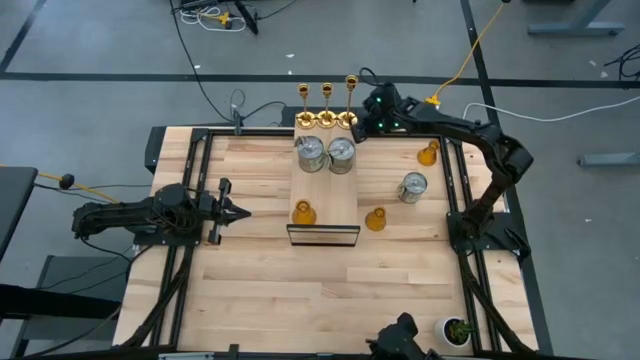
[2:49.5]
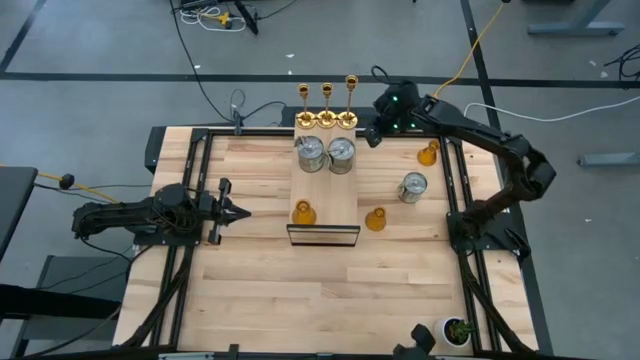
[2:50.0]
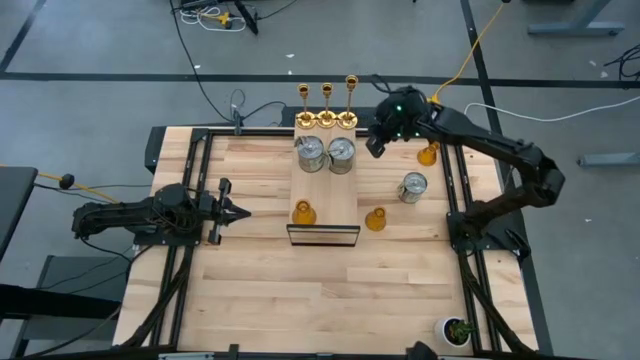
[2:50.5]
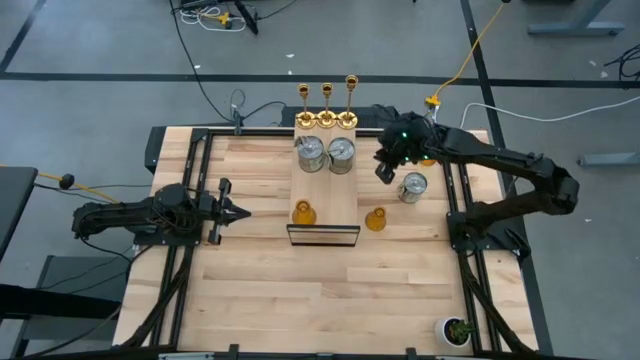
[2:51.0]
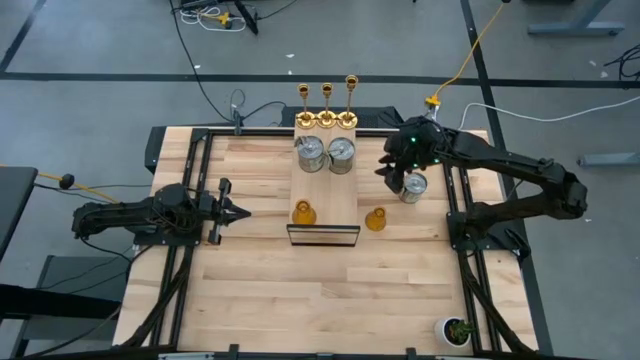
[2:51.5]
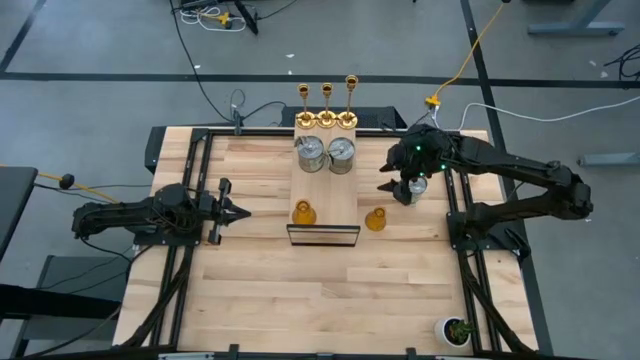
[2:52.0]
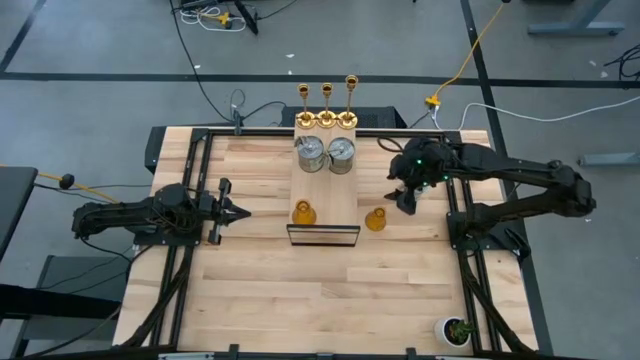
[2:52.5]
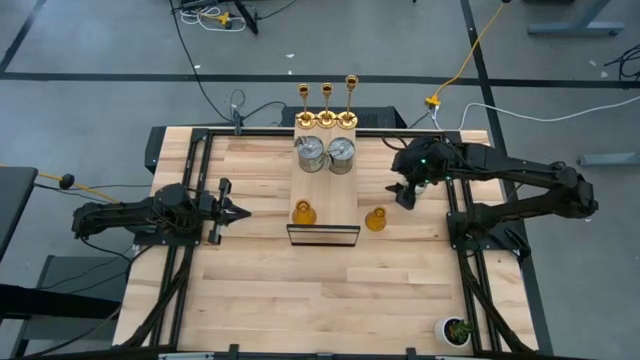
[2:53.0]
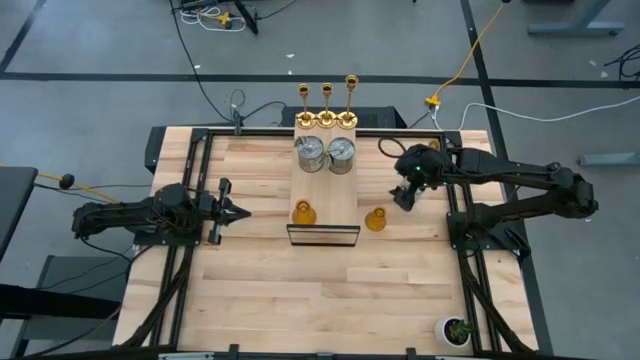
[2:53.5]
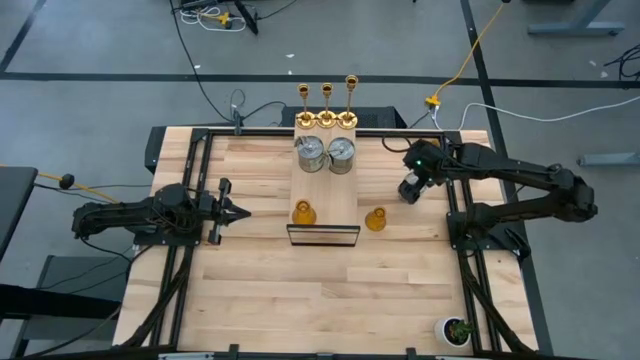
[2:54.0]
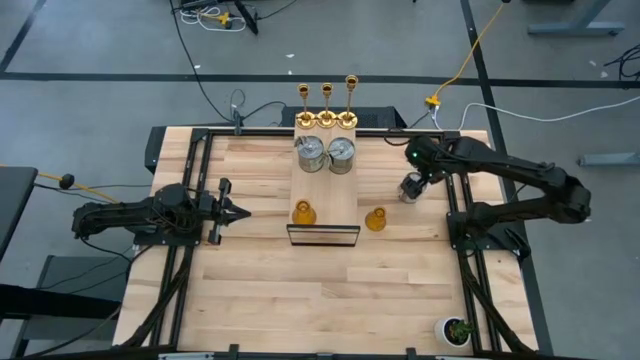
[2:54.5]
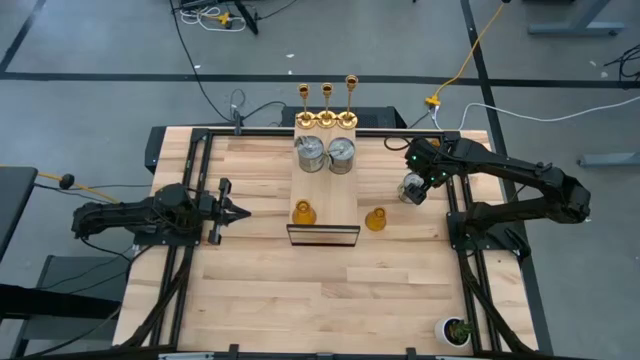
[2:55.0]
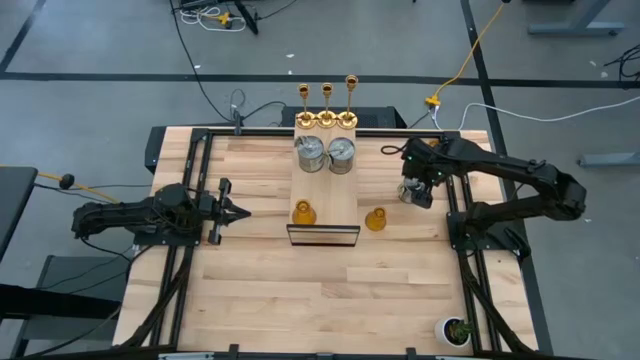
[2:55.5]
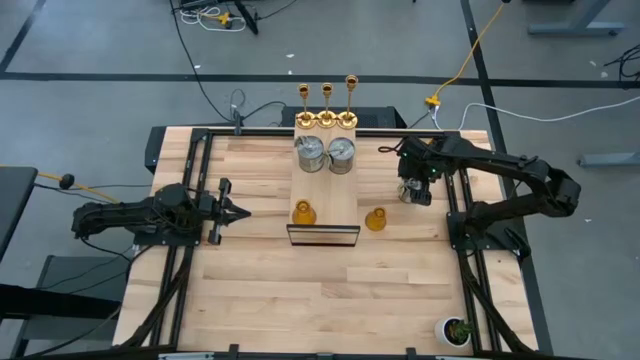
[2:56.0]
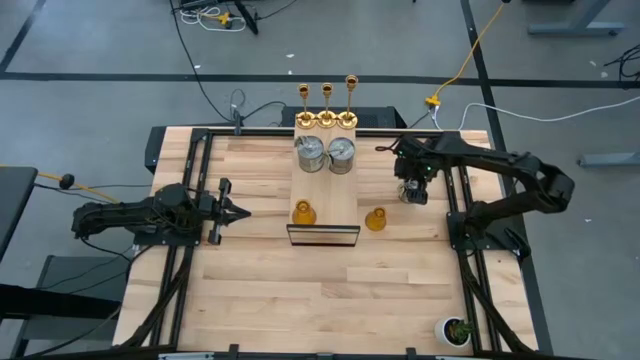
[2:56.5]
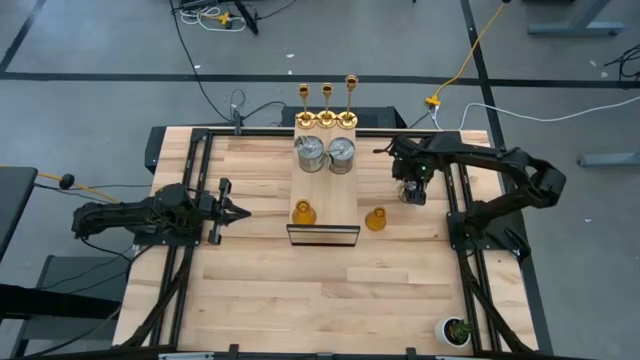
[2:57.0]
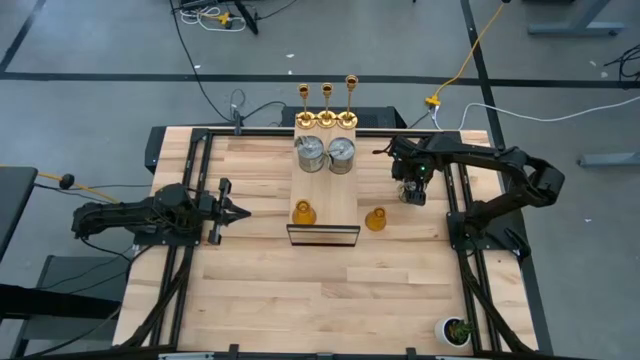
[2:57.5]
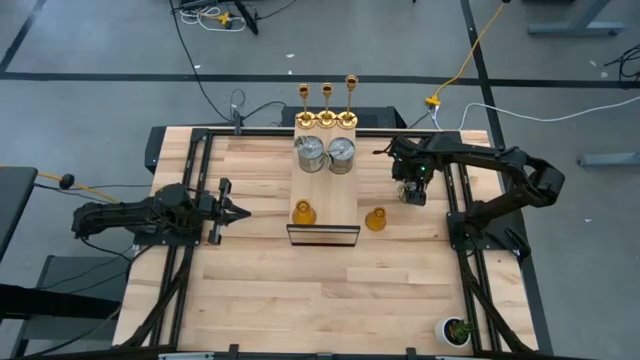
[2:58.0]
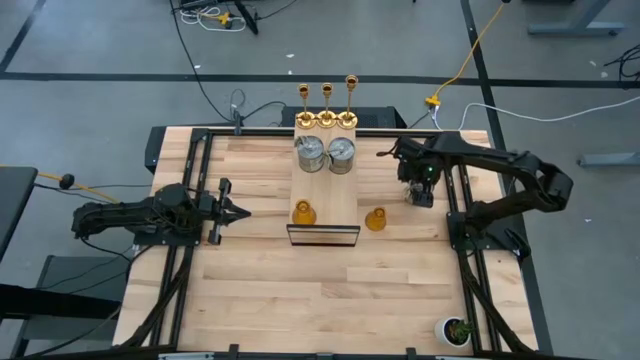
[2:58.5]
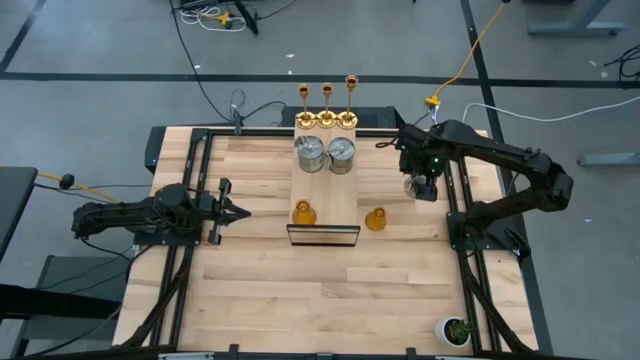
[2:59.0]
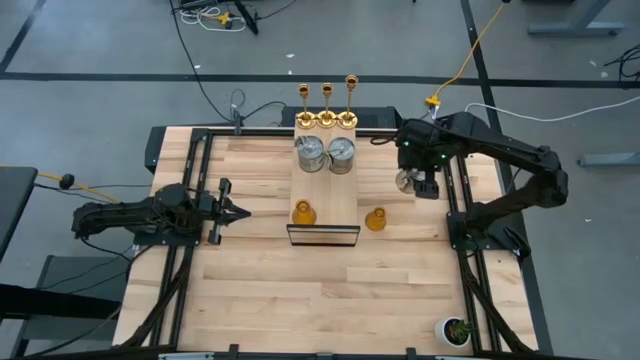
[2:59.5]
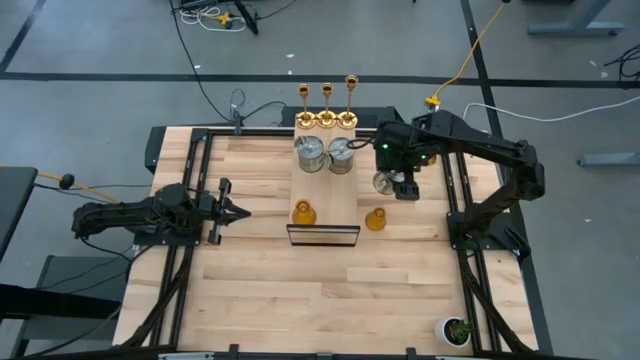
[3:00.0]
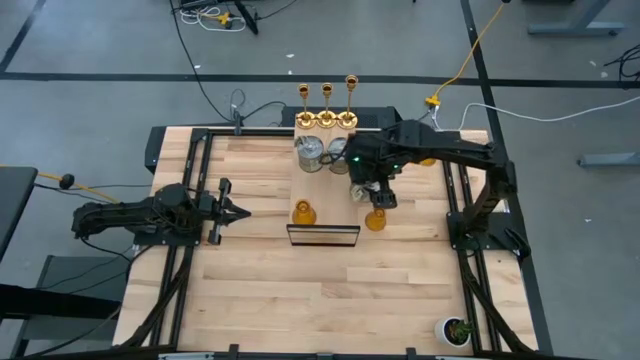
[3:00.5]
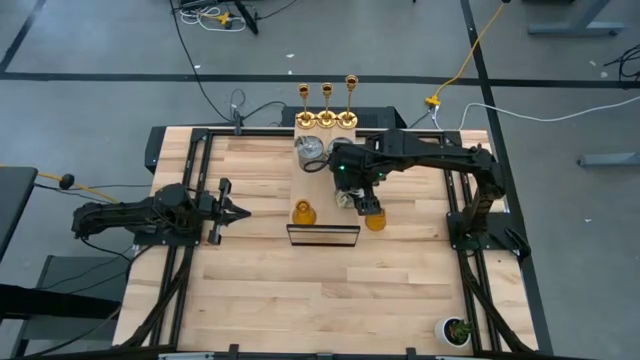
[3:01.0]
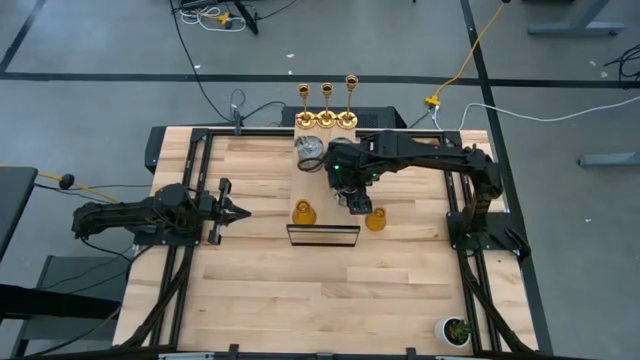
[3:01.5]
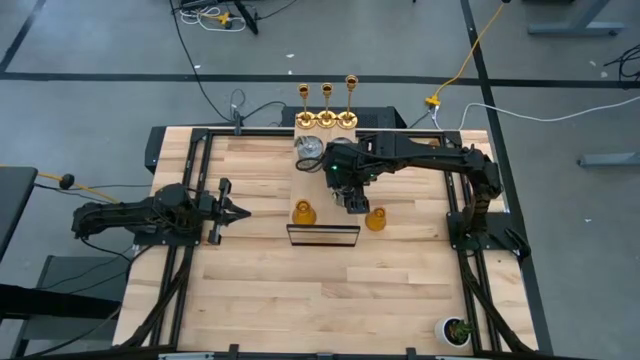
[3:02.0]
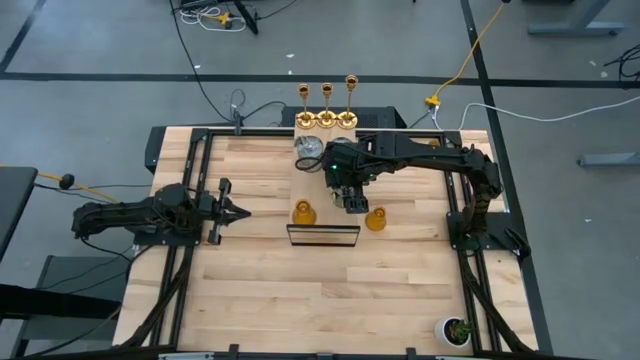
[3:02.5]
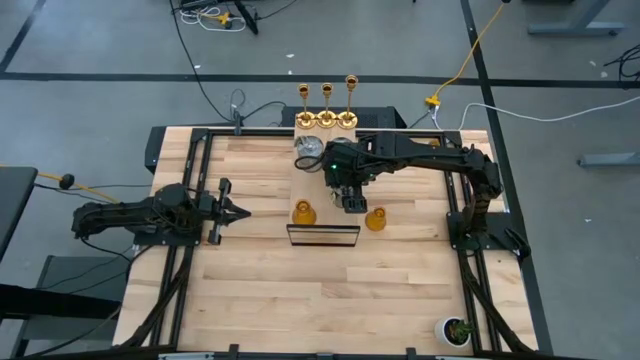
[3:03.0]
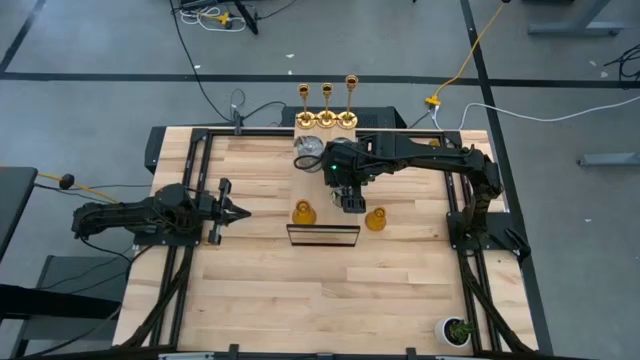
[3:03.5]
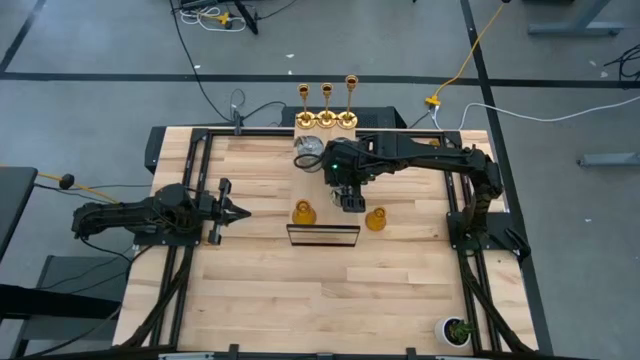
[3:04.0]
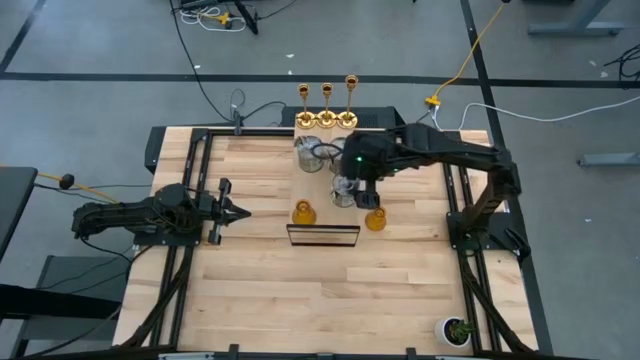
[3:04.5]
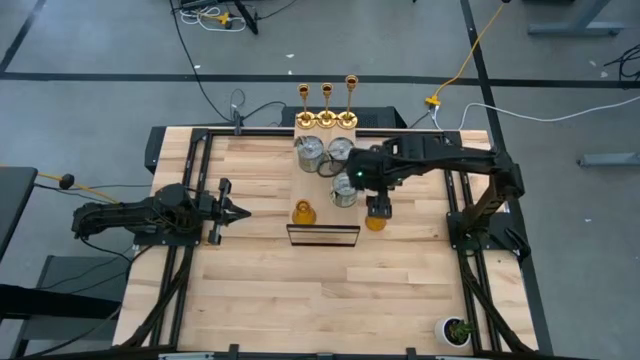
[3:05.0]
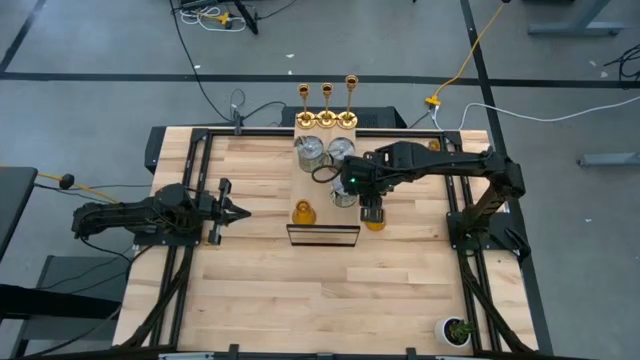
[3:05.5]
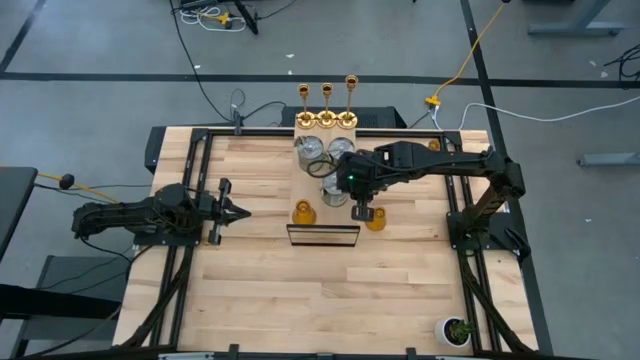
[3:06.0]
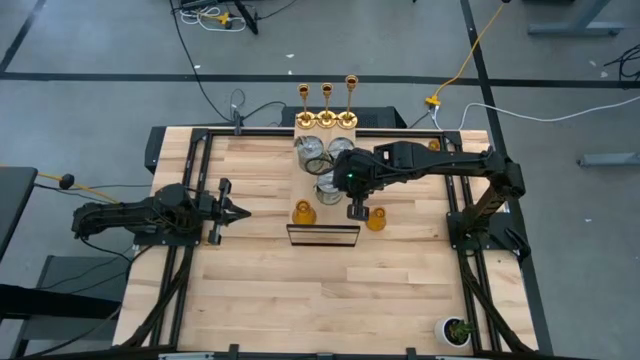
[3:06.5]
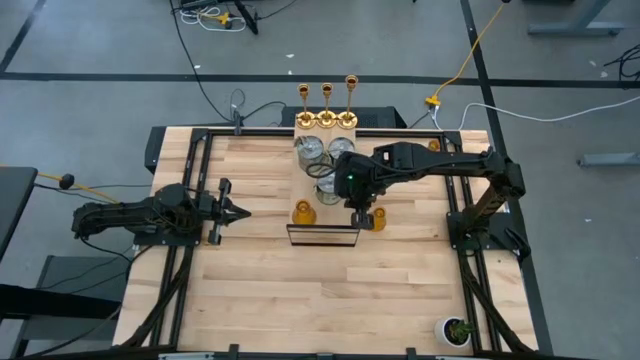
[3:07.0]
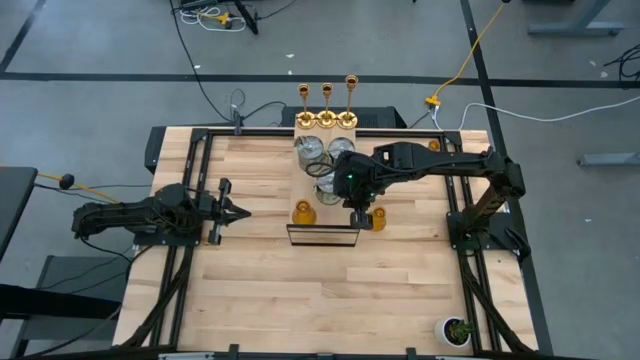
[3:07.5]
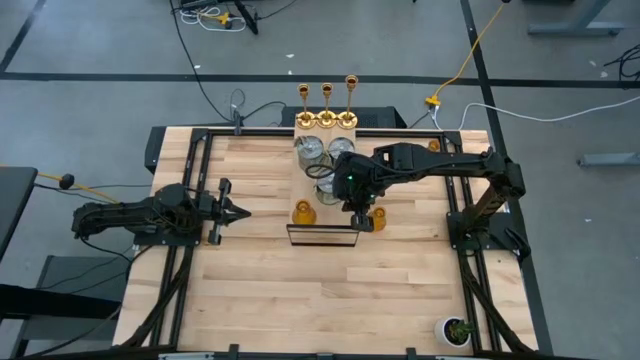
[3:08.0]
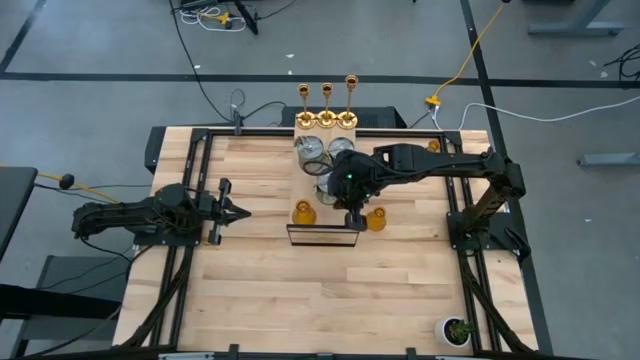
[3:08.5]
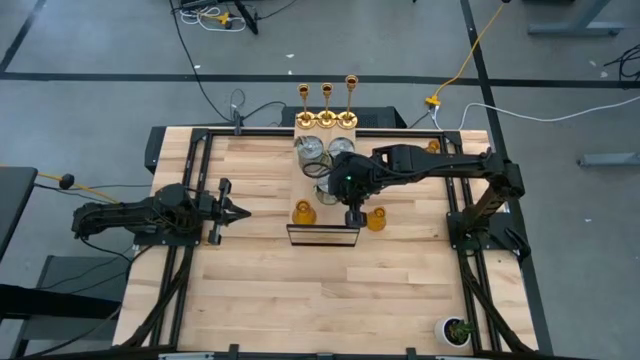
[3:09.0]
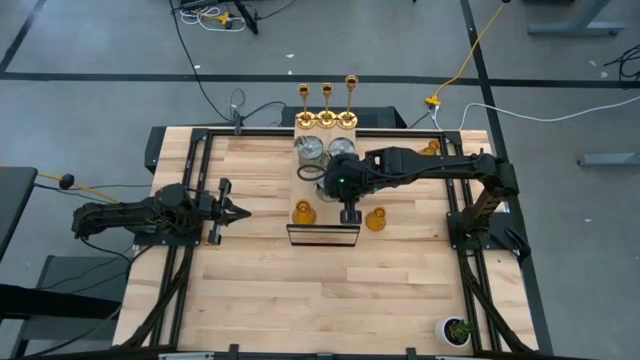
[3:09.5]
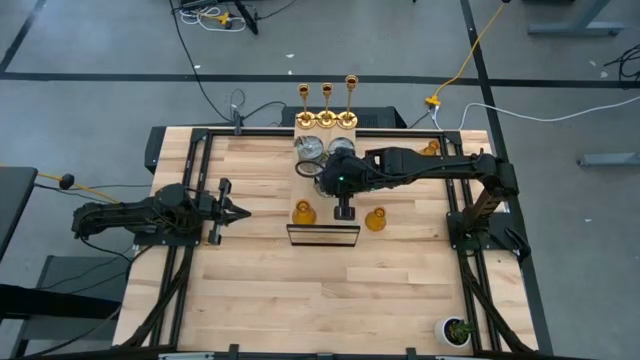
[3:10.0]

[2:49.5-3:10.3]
Task: Pick & Place candle stick holders
Put the scented candle can on the shelf
